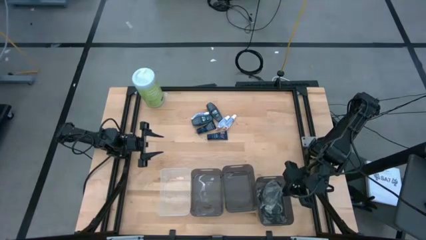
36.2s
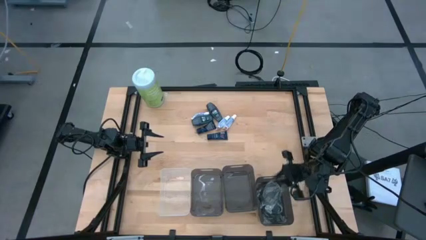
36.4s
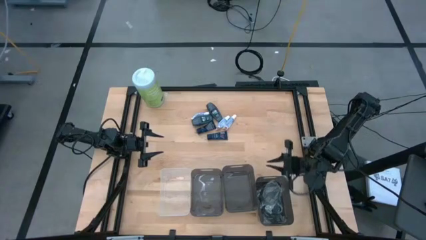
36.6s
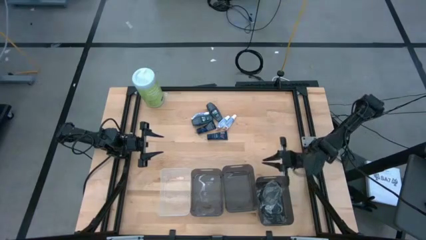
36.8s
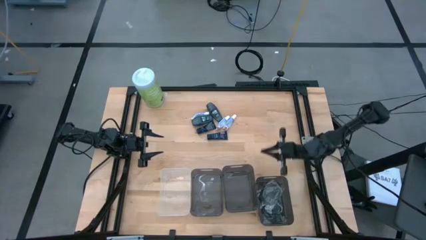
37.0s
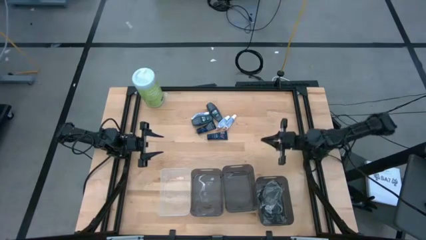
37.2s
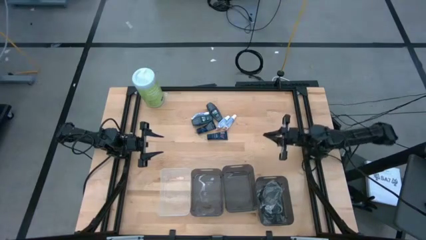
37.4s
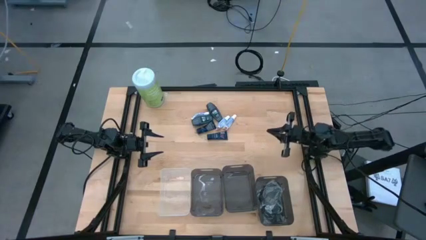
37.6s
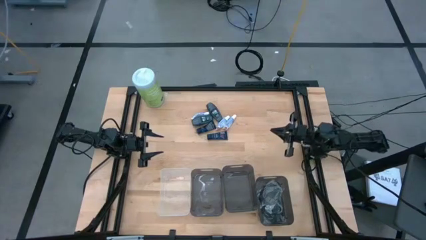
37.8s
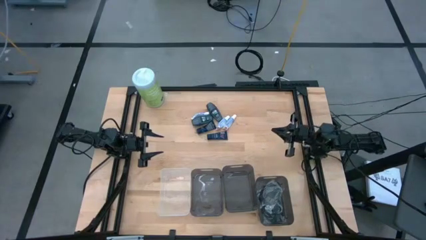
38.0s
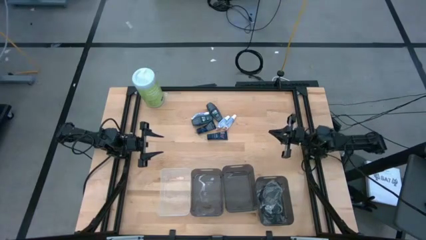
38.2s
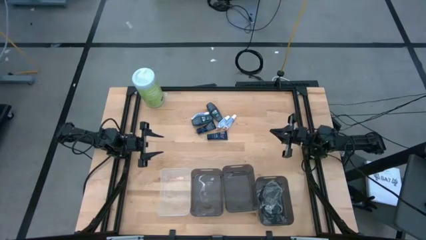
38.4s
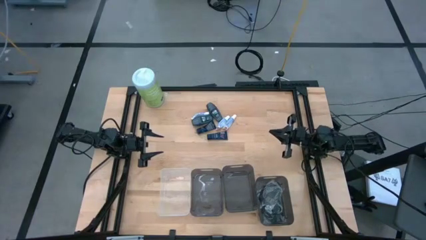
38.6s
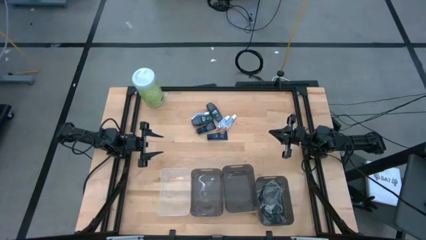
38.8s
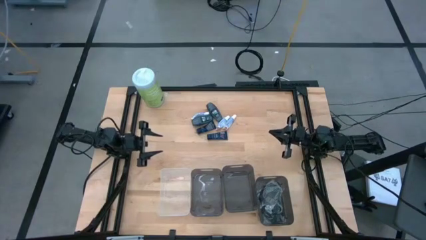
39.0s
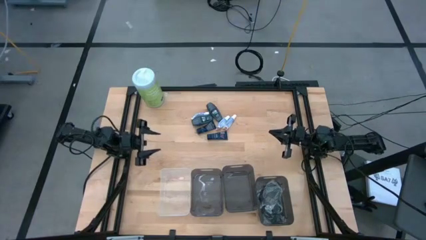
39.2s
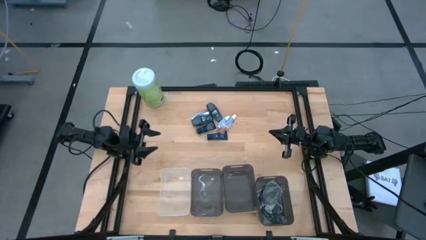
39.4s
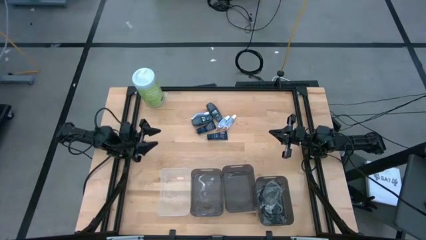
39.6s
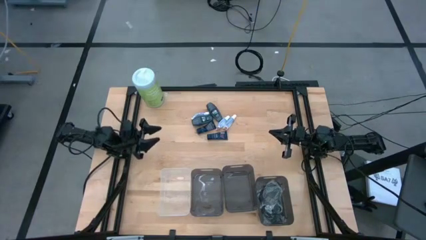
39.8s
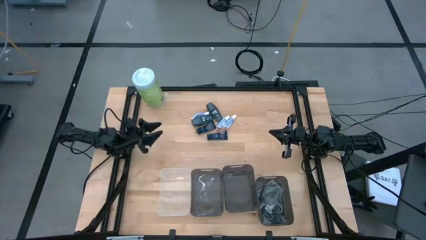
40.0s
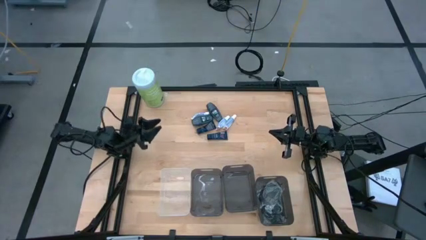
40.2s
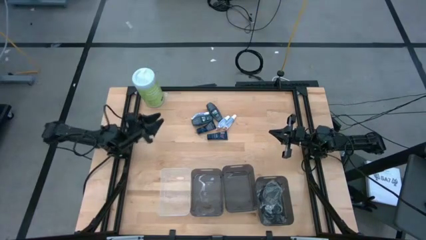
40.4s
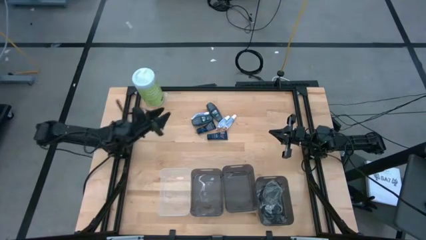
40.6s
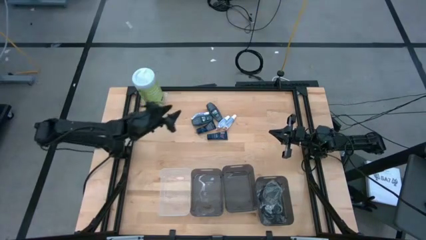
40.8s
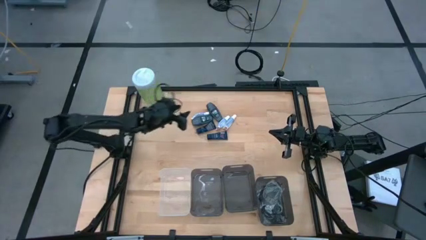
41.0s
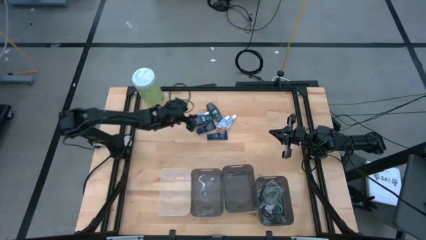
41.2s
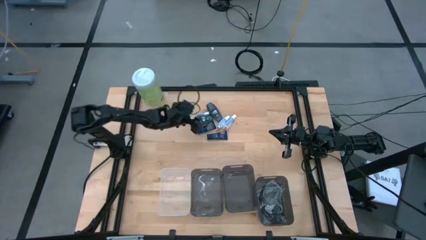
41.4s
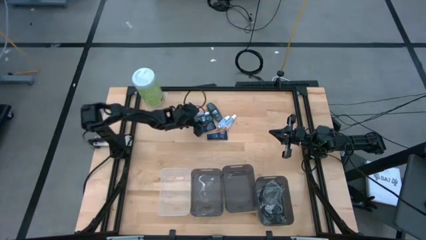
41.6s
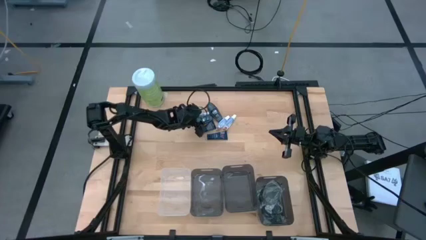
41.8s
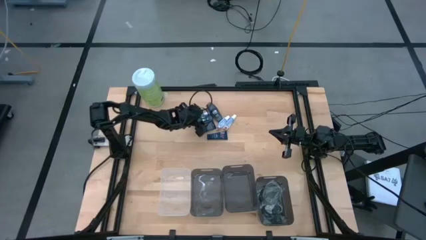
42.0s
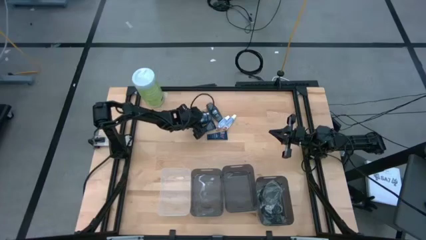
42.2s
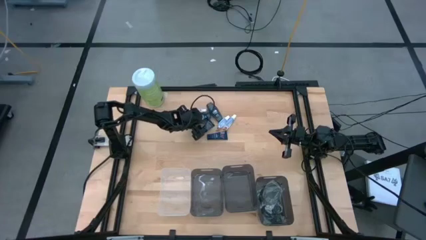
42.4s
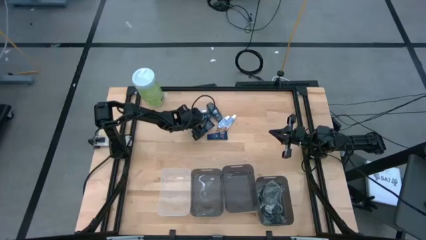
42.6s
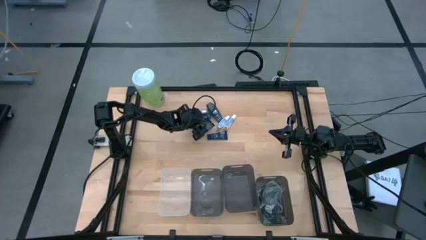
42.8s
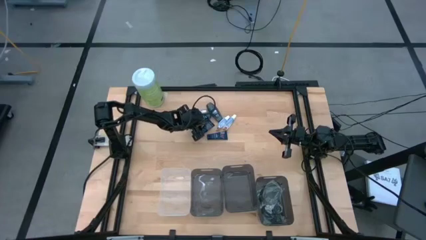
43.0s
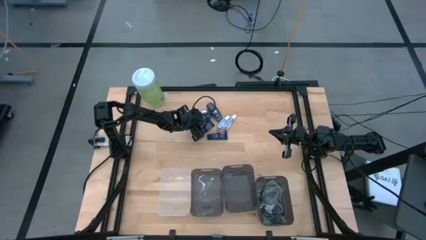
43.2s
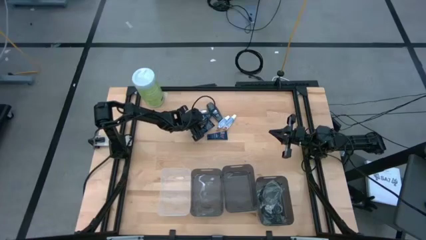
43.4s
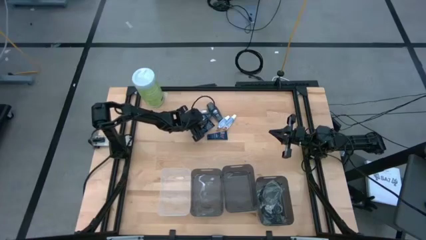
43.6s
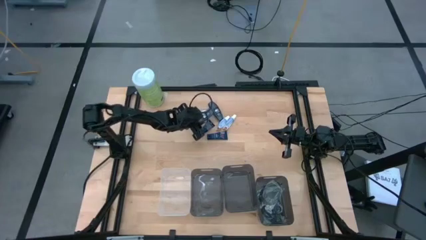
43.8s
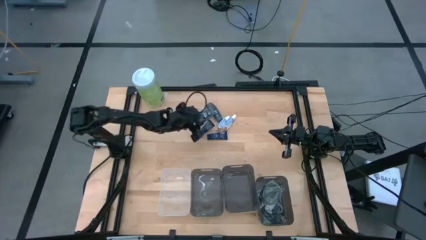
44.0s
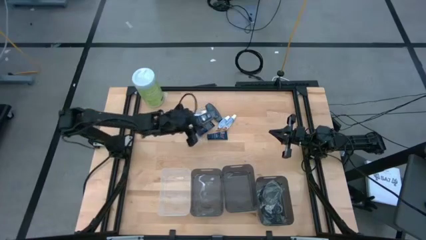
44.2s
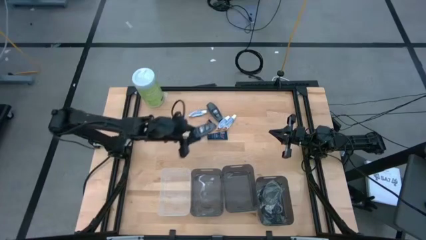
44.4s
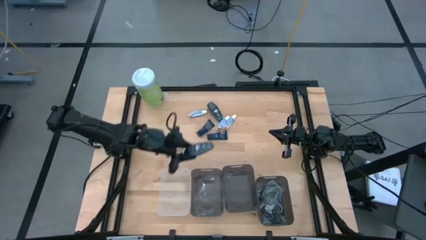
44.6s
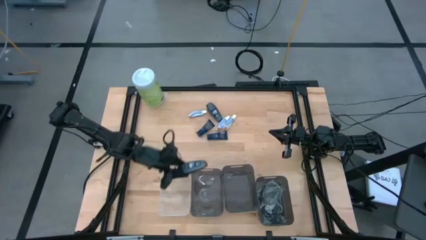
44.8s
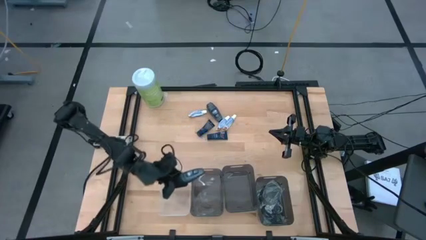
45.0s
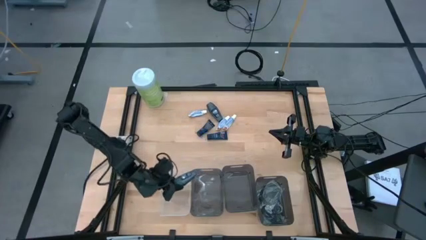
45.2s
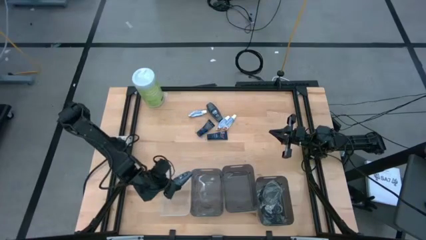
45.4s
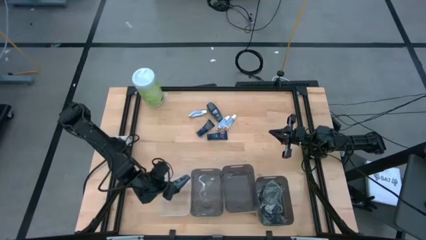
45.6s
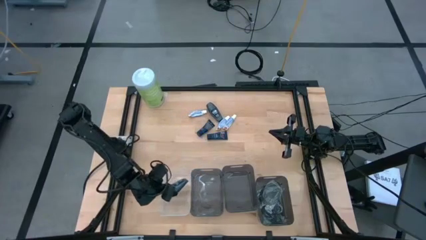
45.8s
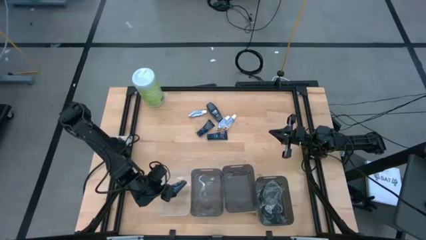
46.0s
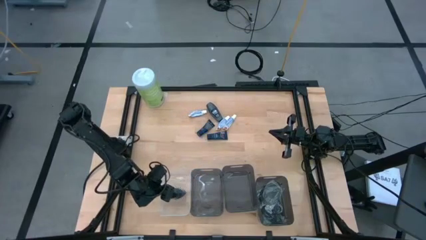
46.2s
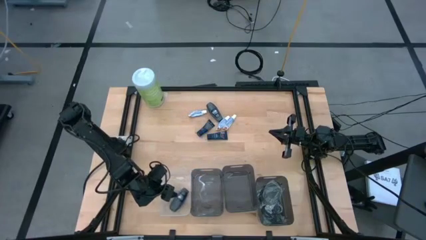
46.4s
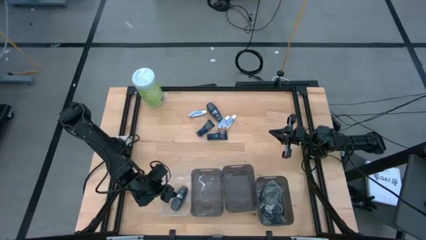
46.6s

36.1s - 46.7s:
Task: Pick & Place Travel size toiletries
Put the top left black deodorant into the transparent bin

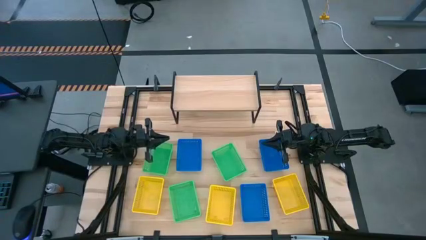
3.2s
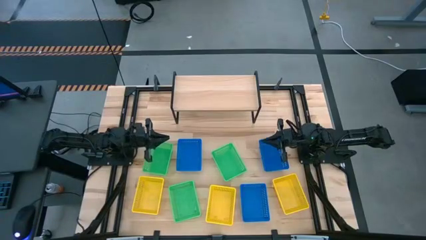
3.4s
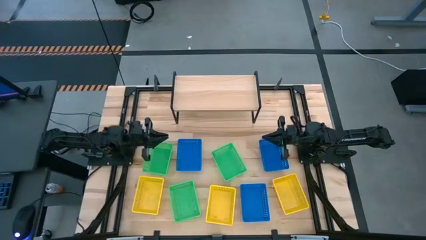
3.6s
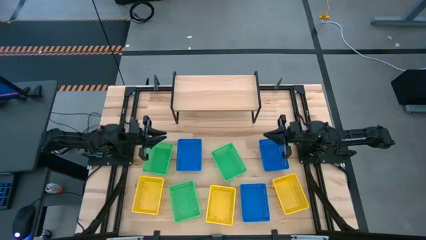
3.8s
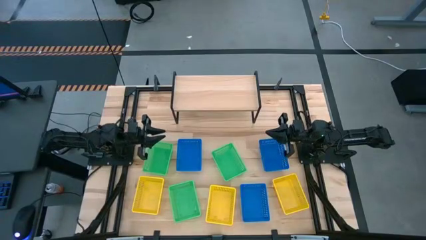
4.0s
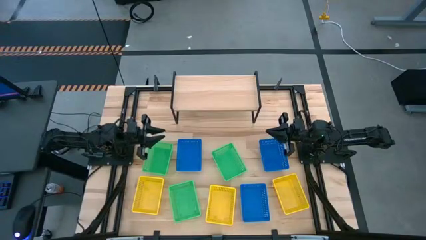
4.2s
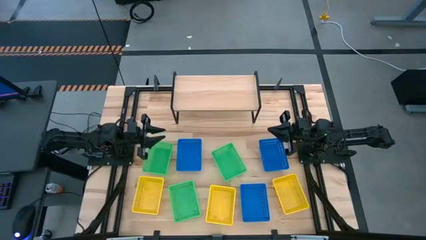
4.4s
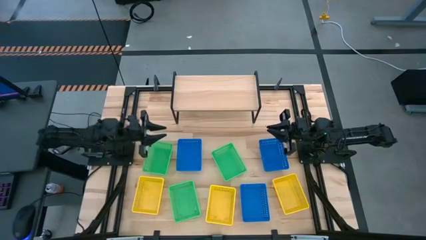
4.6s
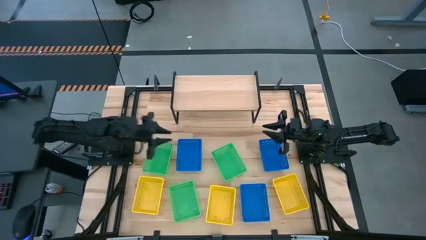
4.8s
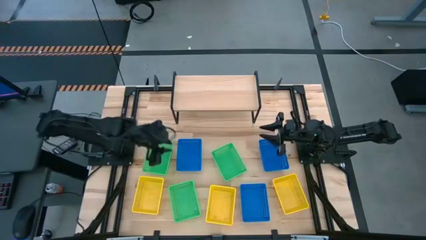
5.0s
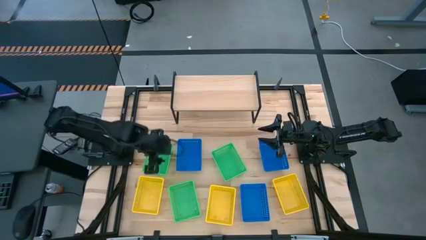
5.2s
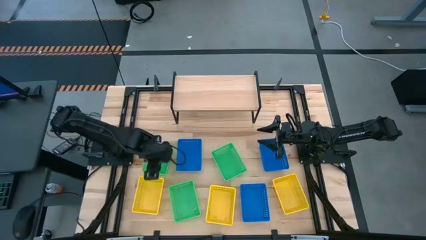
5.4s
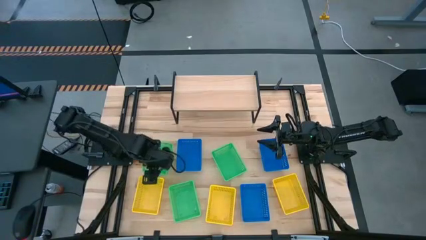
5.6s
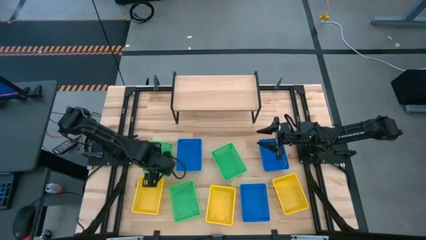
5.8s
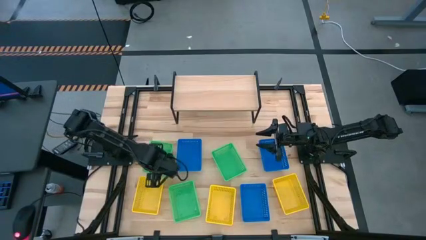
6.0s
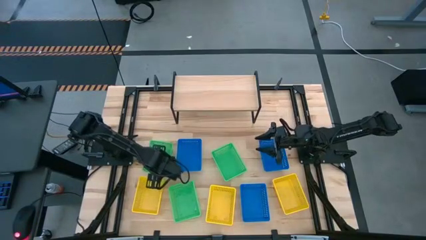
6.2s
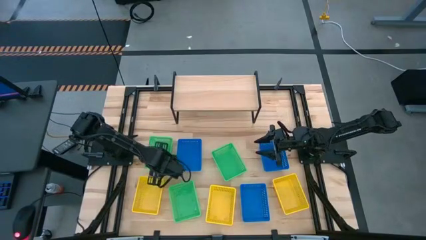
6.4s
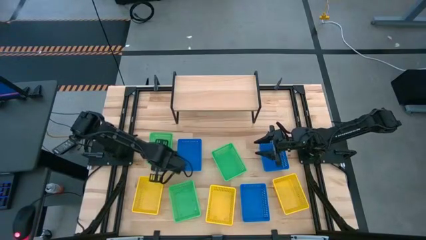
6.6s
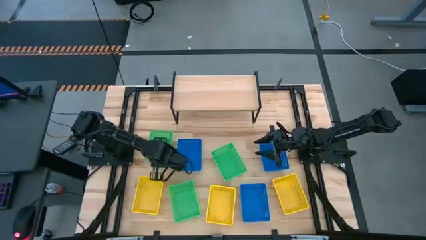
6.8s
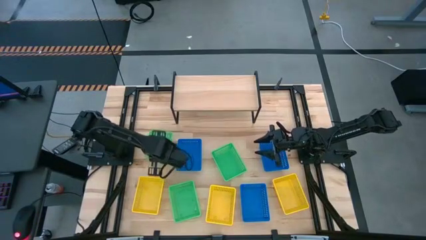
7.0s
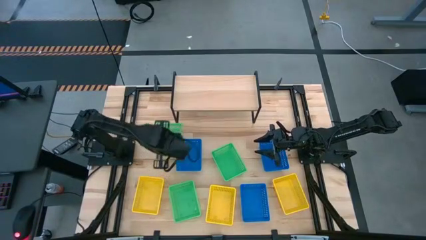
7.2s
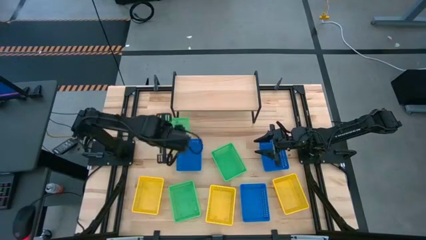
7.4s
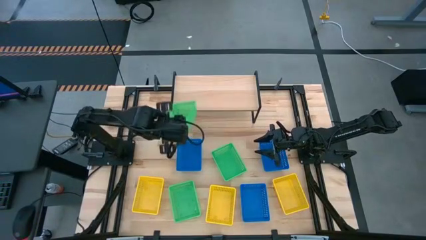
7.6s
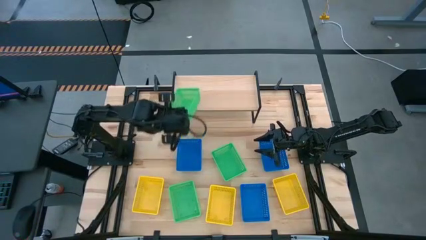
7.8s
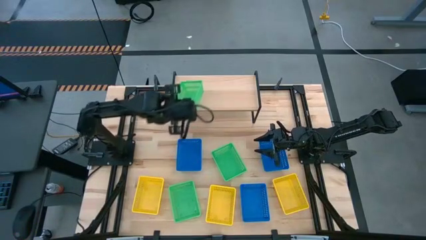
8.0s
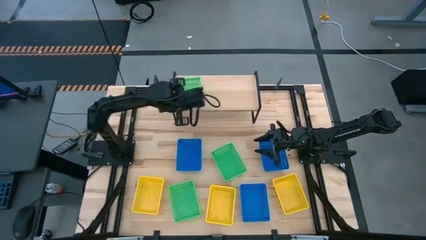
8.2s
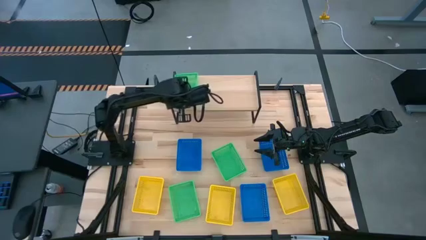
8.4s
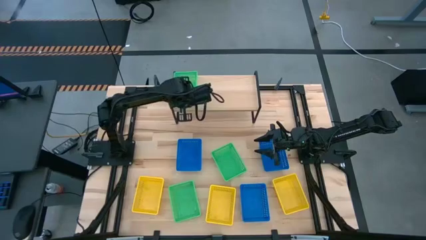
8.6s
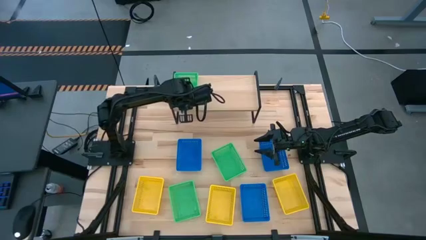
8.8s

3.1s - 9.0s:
Task: Stack baskets on shelf by color
Put the top left green bin on the shelf
